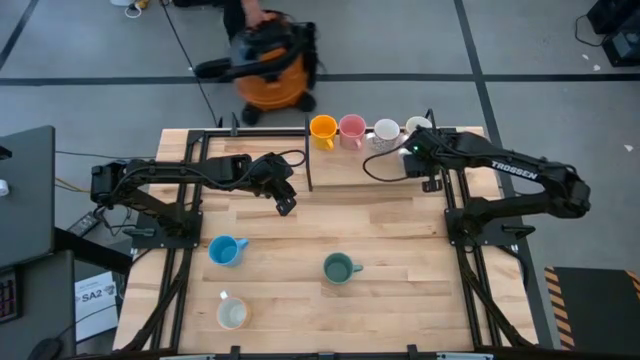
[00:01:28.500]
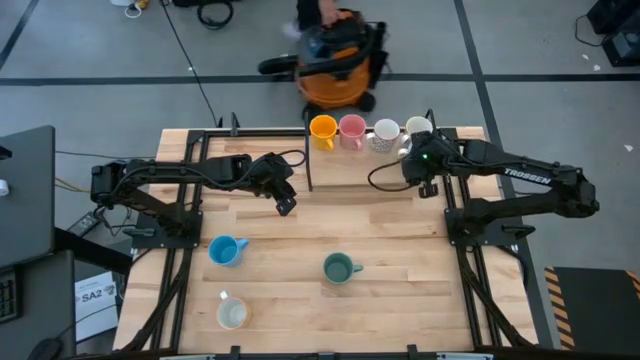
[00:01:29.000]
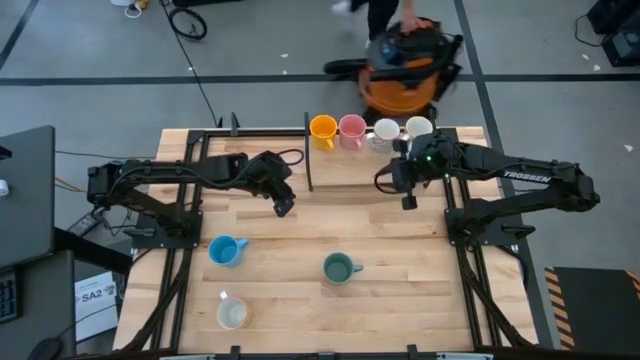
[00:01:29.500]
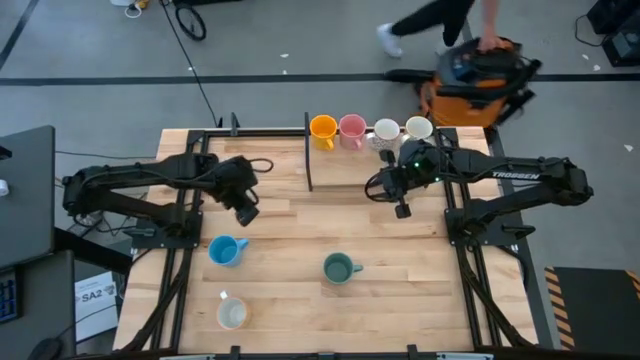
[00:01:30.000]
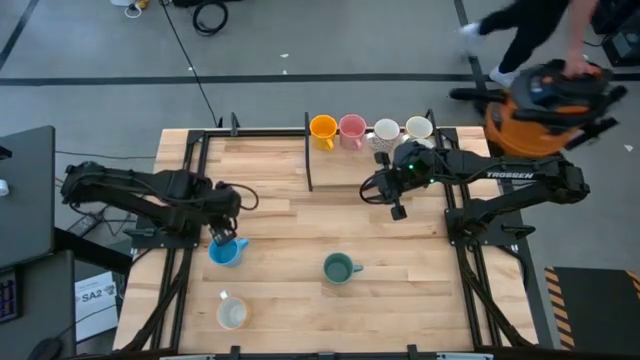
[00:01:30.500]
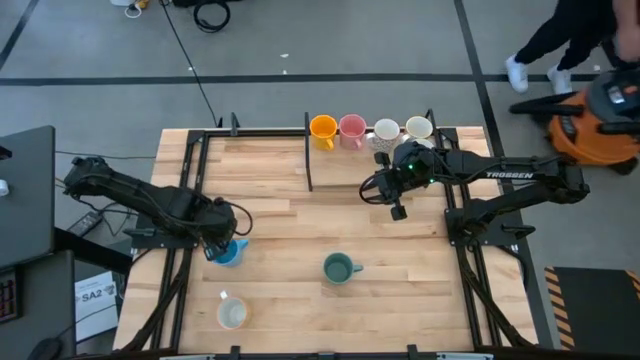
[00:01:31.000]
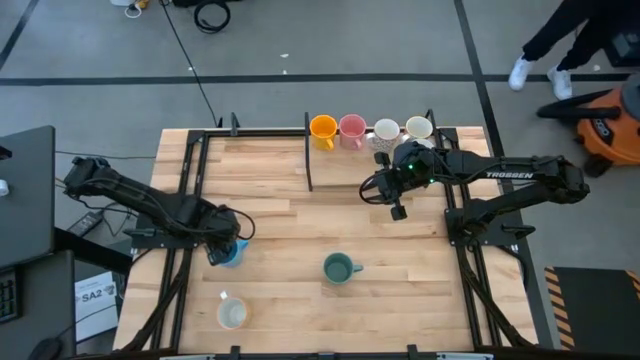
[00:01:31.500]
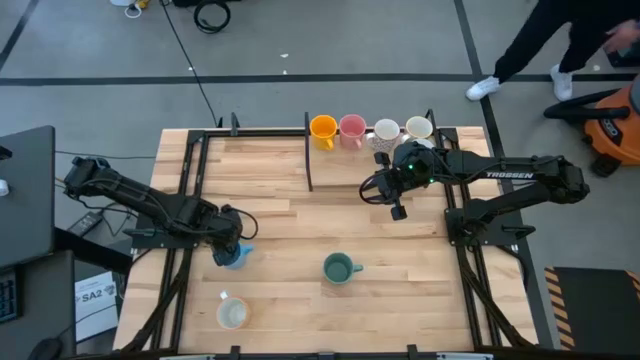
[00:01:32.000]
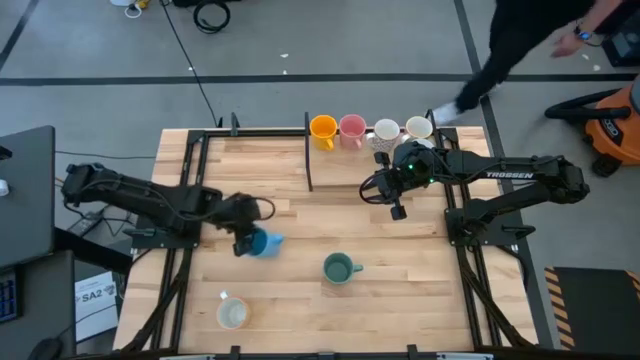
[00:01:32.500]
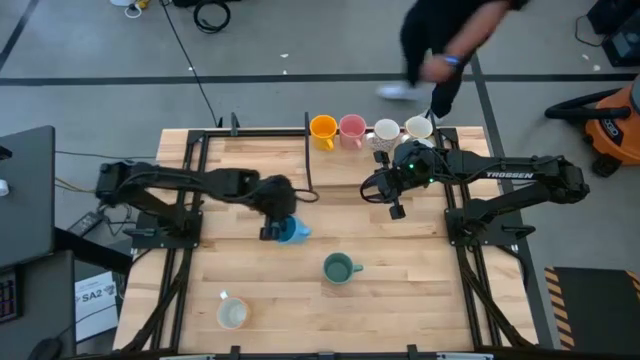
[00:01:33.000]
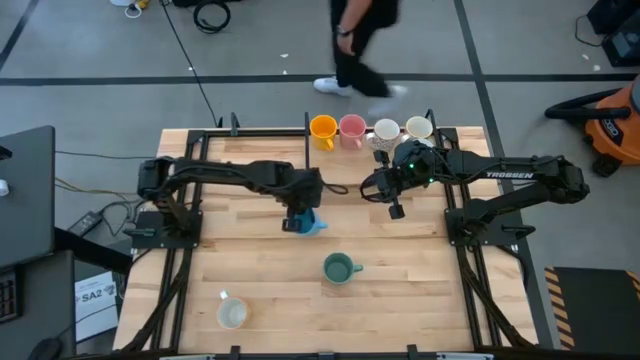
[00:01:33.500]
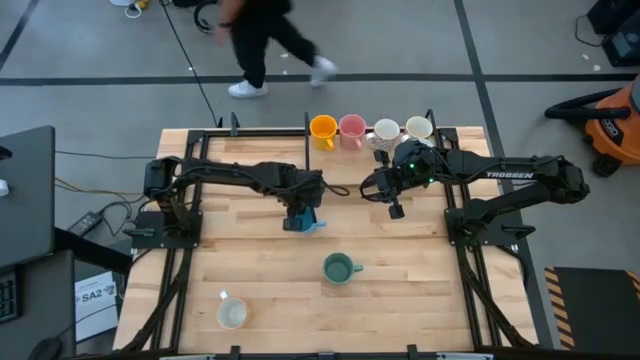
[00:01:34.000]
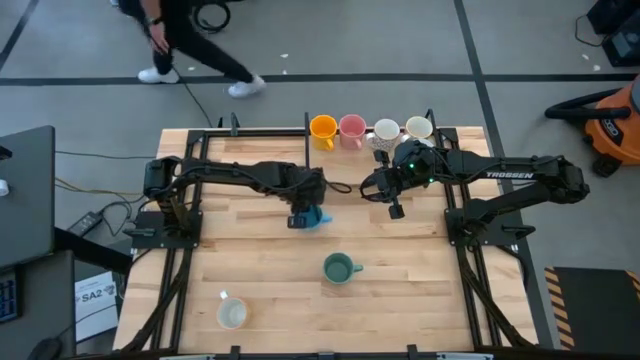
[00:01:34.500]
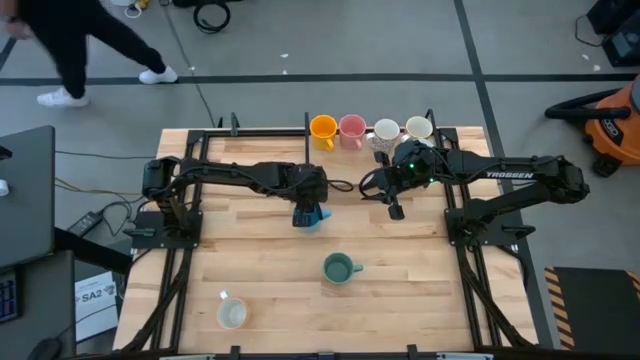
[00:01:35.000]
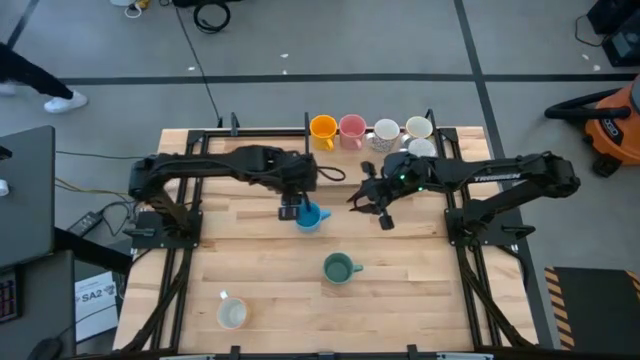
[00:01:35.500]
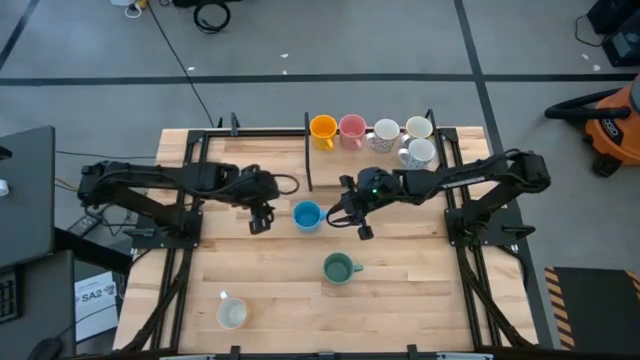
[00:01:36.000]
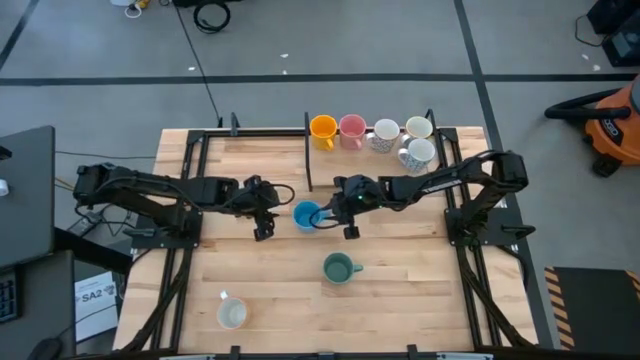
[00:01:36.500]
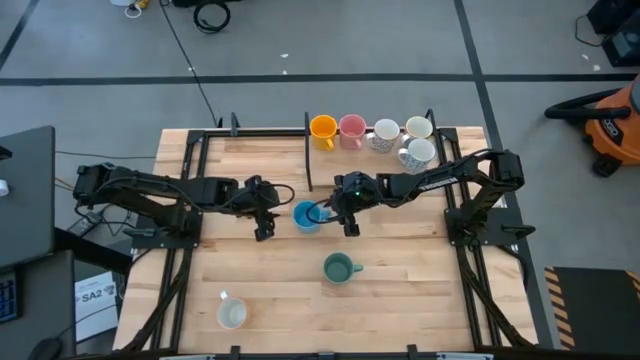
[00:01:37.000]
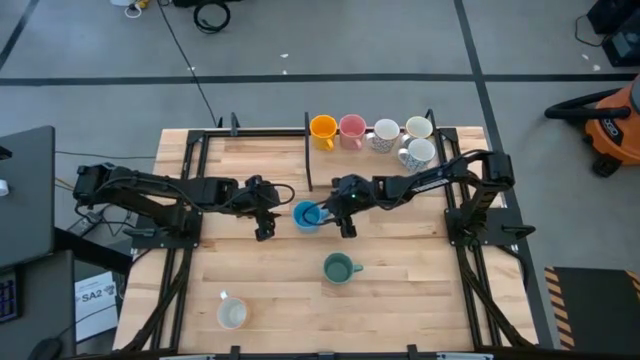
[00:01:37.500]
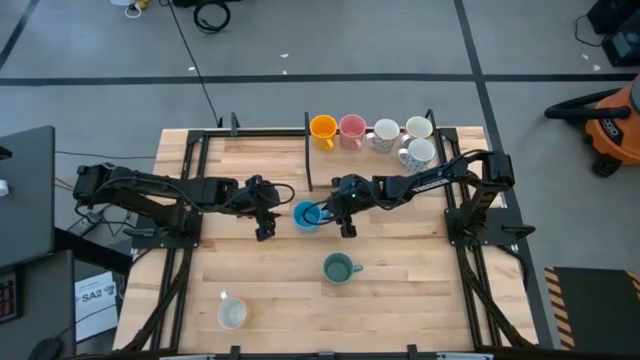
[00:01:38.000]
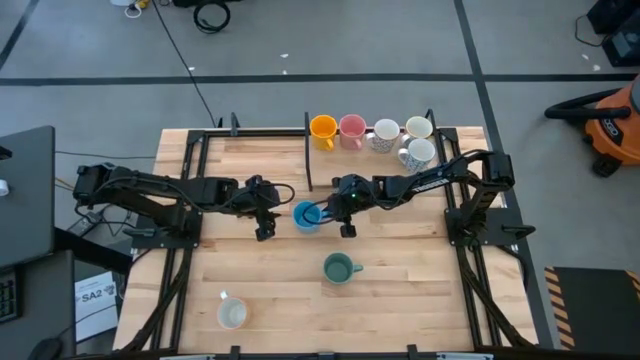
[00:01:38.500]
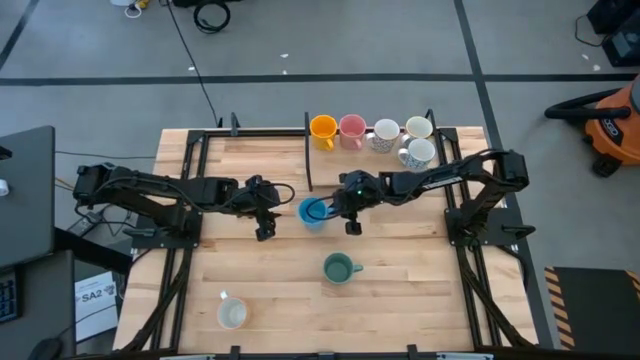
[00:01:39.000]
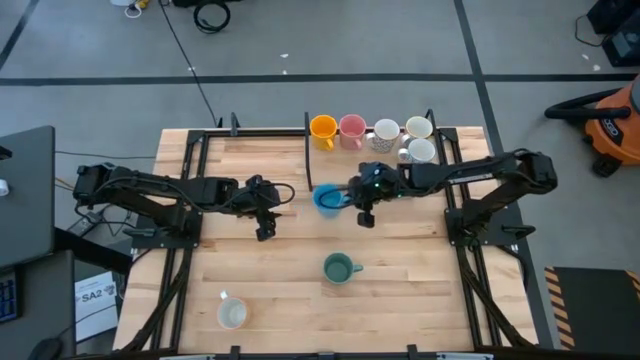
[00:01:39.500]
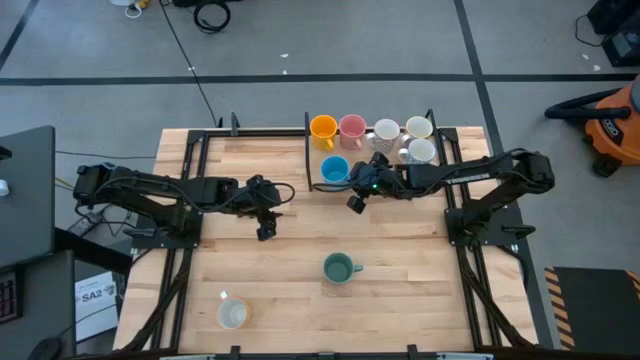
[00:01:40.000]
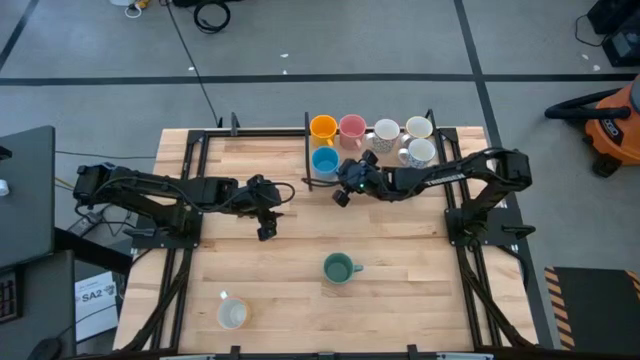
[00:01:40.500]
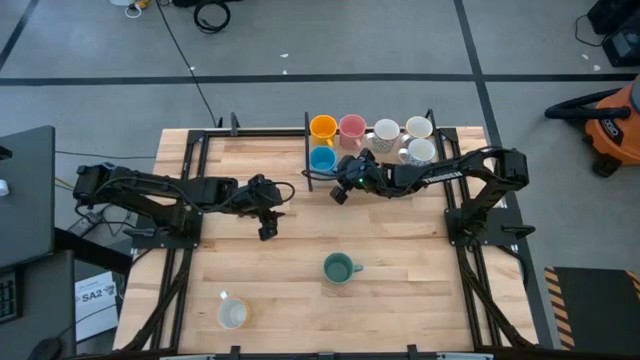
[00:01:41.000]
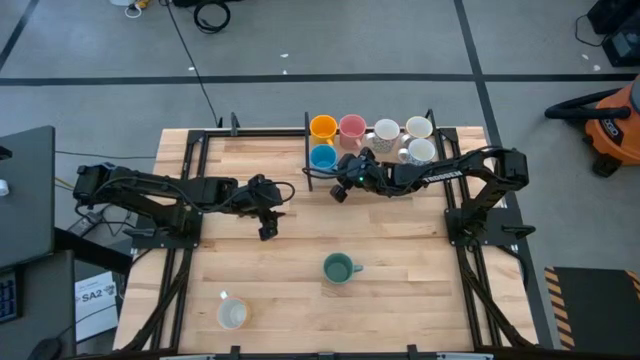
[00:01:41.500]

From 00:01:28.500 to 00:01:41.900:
Task: Place coffee mugs
Put the blue mug on the shelf

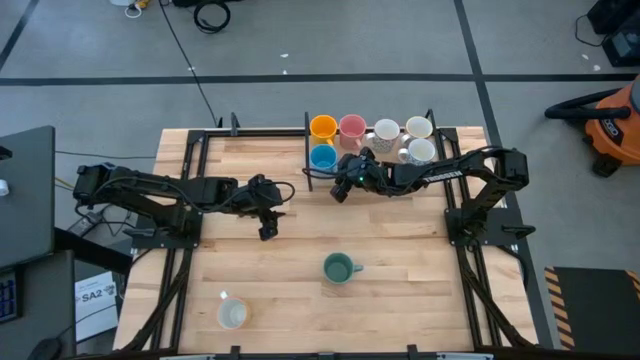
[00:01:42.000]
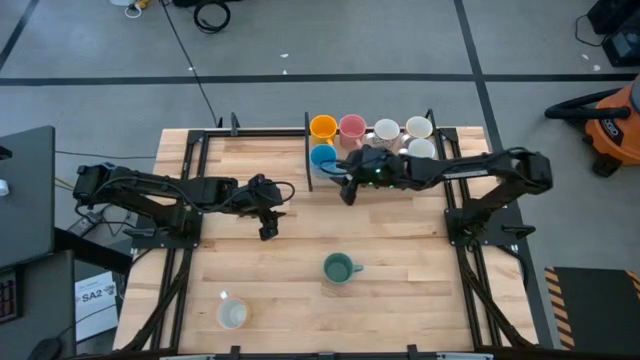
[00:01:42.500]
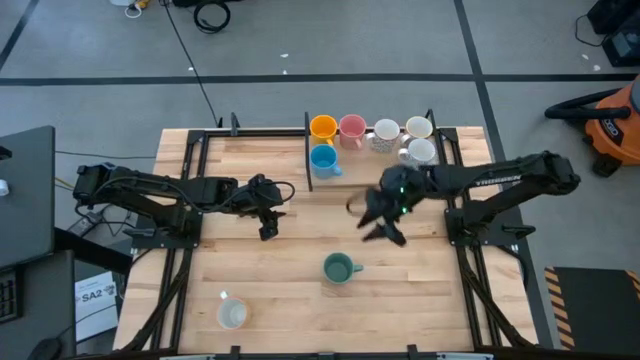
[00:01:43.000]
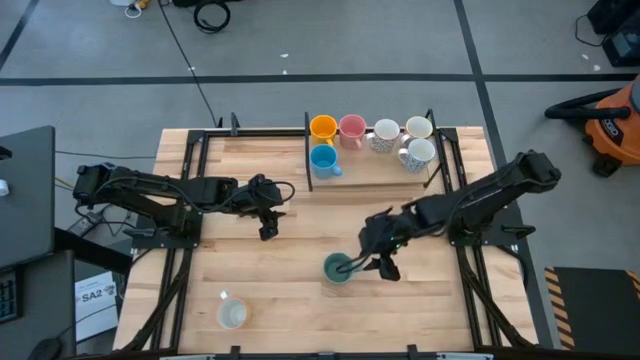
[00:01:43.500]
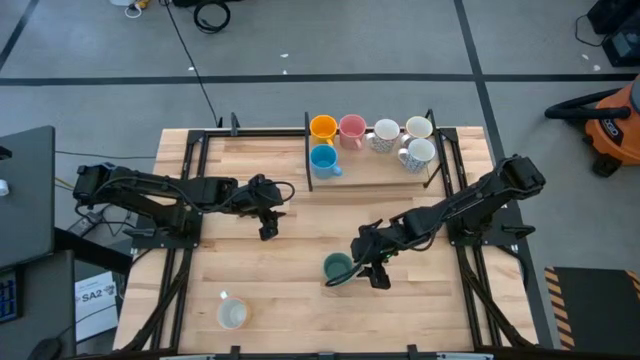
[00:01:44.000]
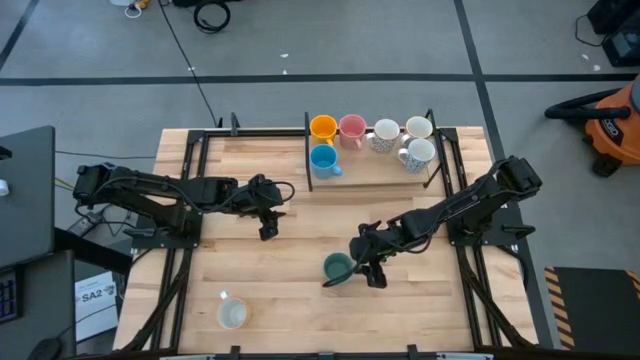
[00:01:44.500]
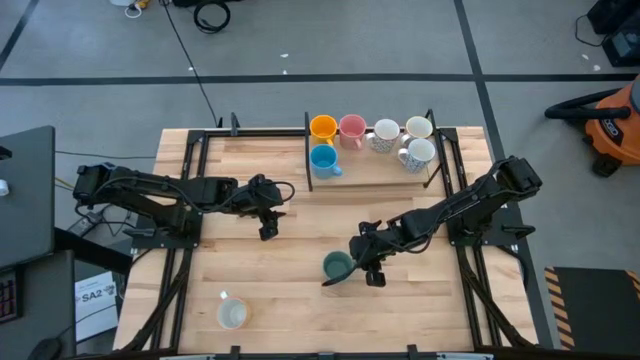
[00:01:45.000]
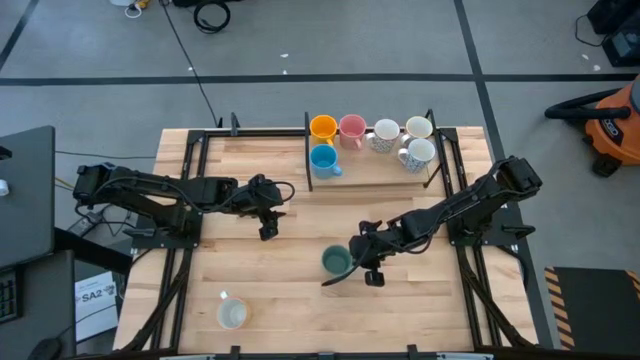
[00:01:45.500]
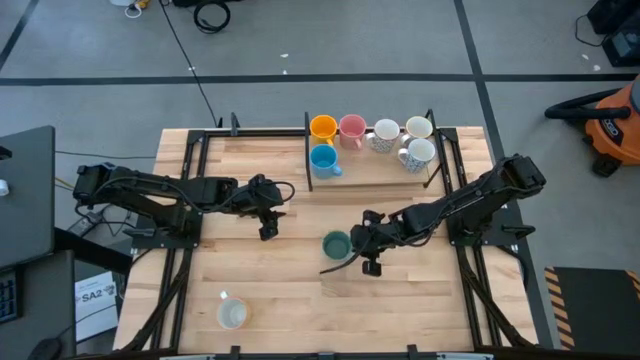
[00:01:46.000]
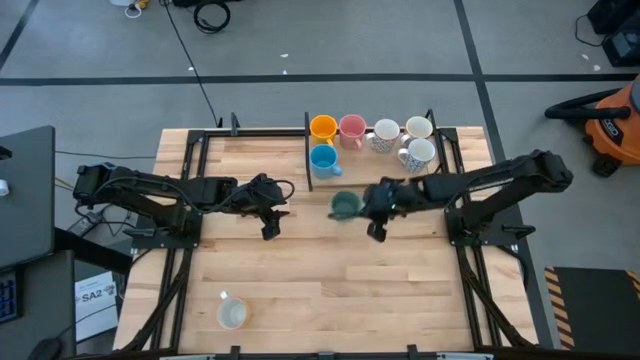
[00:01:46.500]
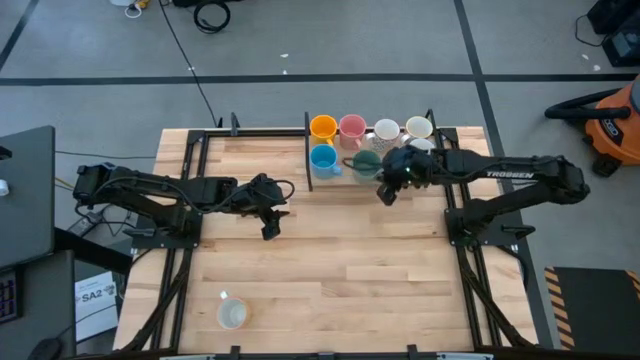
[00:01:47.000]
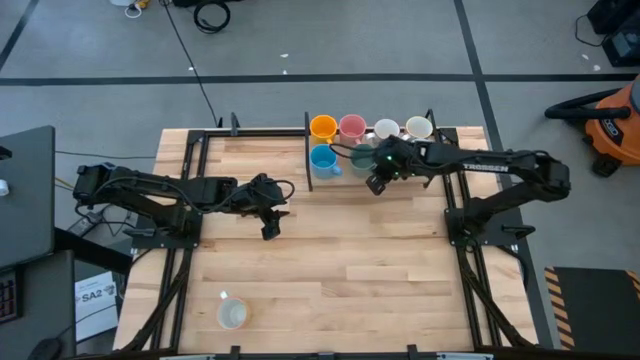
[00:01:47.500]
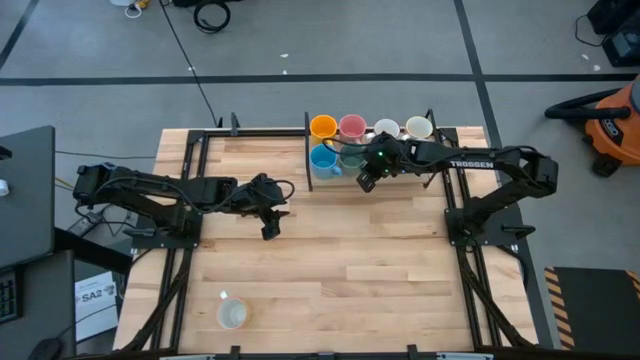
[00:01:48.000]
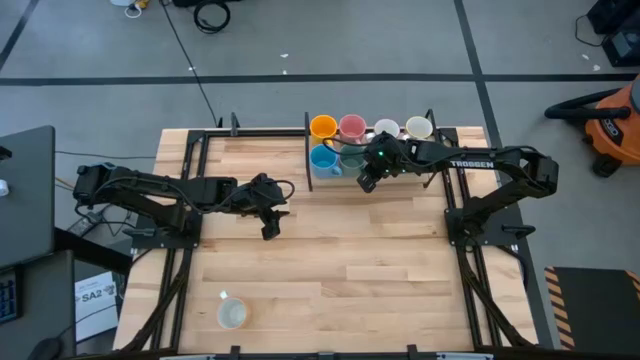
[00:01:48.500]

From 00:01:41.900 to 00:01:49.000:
Put the green mug on the shelf

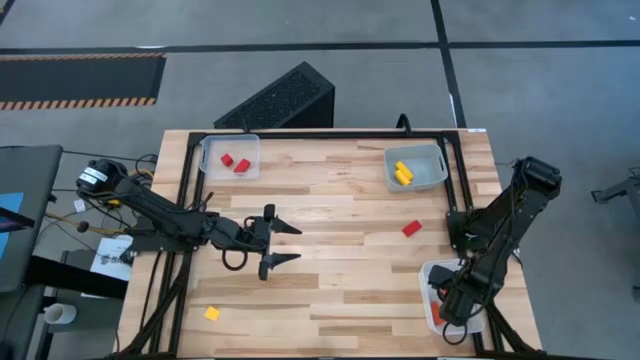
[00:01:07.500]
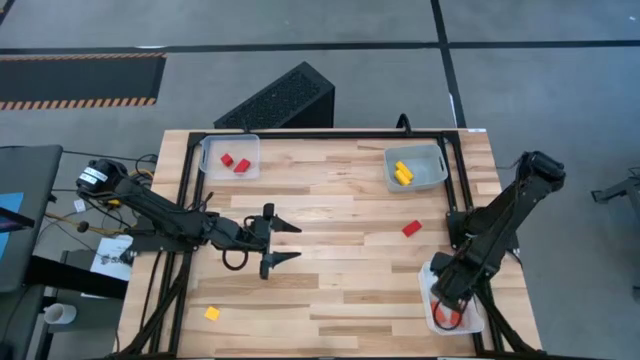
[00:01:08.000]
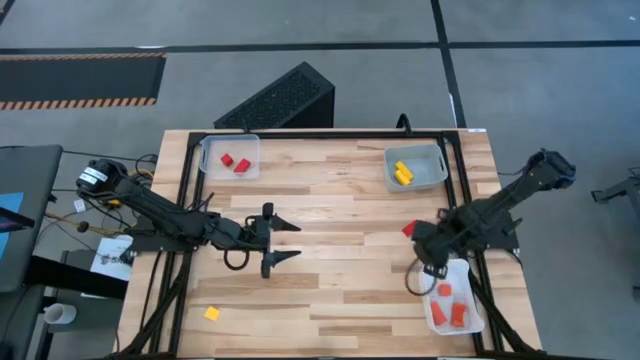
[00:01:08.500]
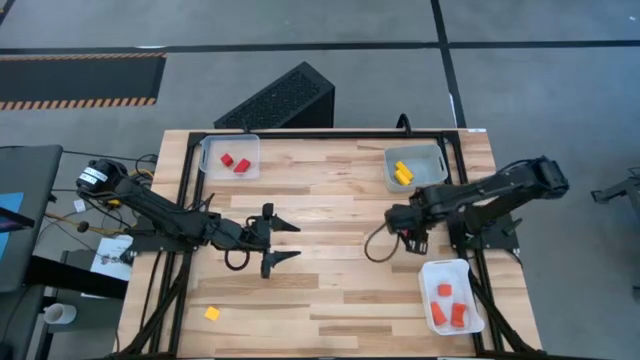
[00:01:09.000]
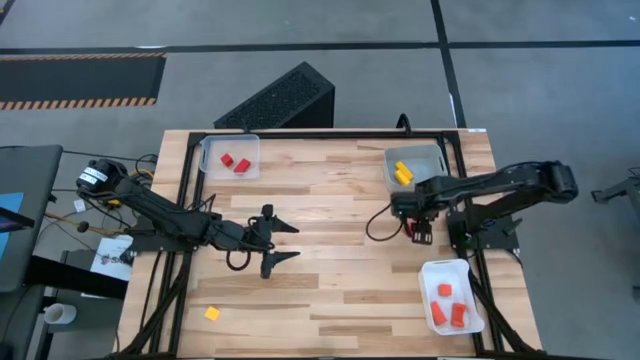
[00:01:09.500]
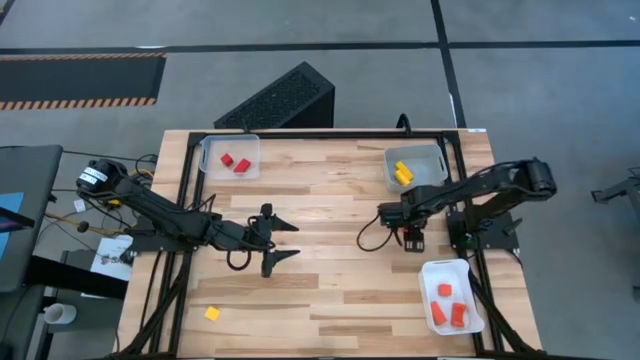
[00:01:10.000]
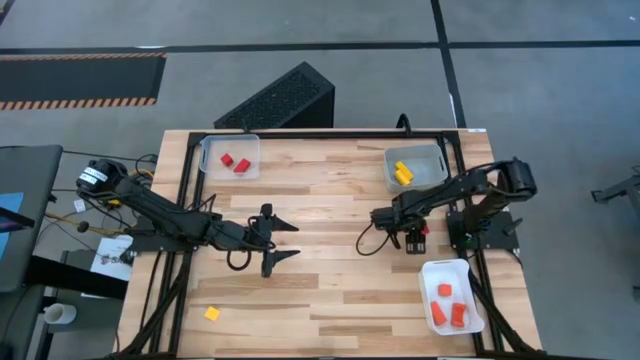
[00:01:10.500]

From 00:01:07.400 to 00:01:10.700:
Task: Sort & place blocks by color
Put the red block into the transparent bin
